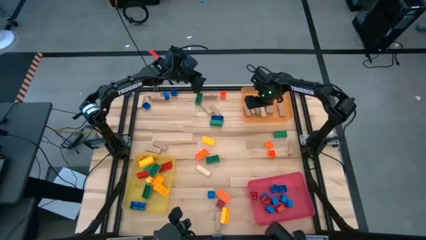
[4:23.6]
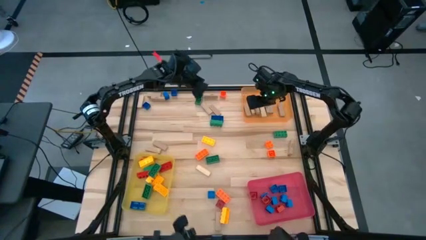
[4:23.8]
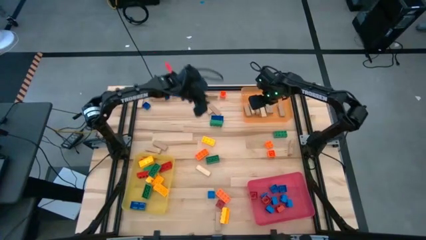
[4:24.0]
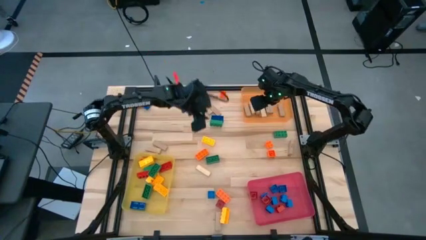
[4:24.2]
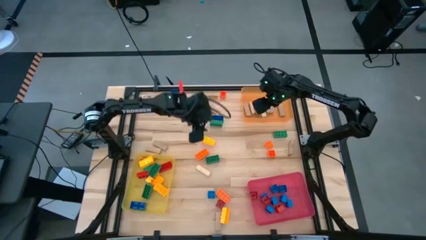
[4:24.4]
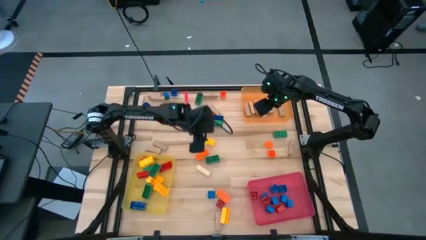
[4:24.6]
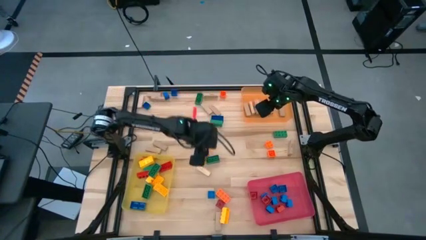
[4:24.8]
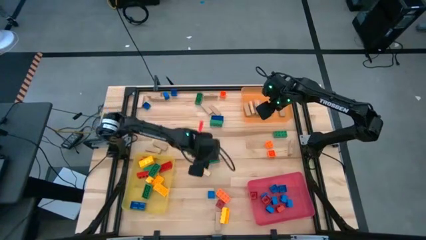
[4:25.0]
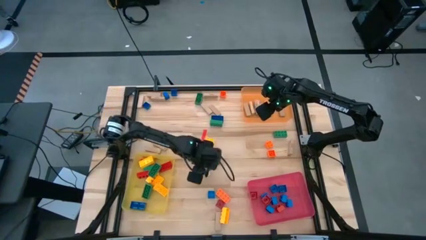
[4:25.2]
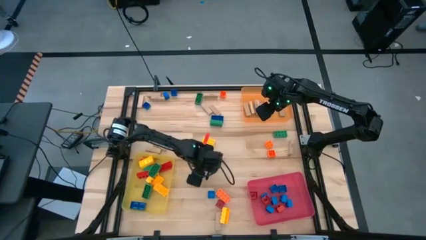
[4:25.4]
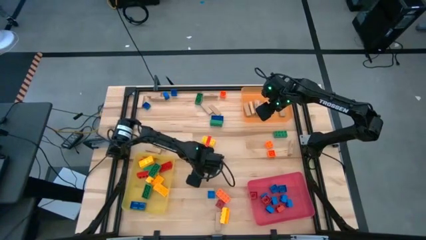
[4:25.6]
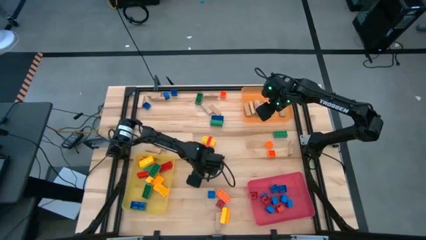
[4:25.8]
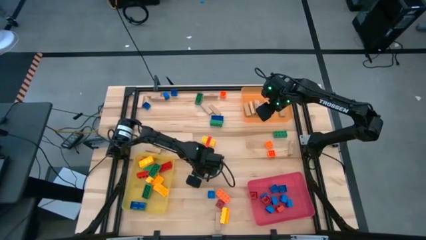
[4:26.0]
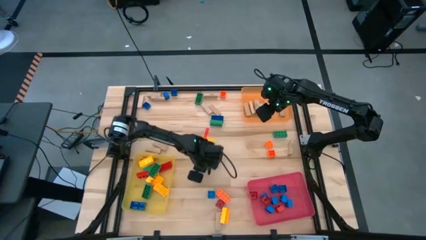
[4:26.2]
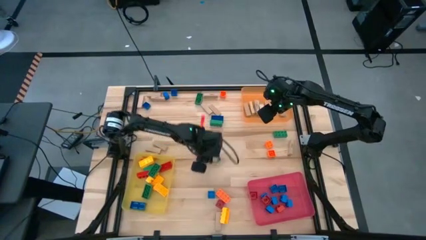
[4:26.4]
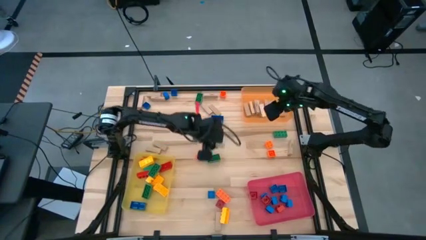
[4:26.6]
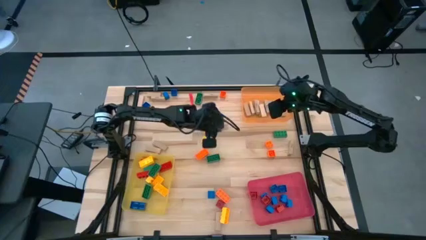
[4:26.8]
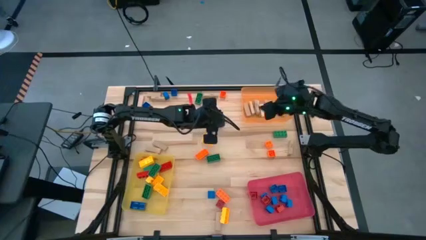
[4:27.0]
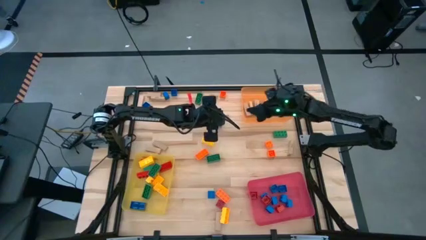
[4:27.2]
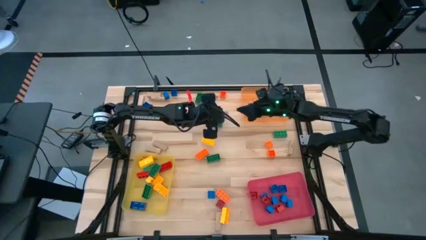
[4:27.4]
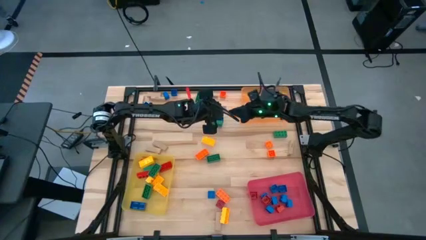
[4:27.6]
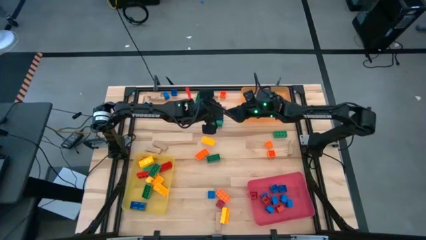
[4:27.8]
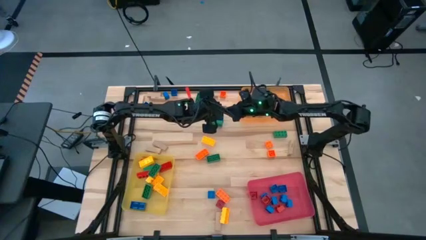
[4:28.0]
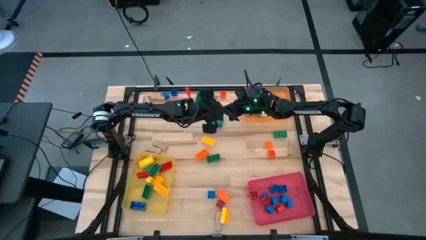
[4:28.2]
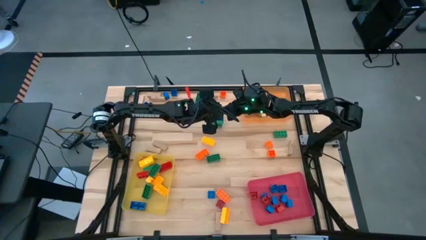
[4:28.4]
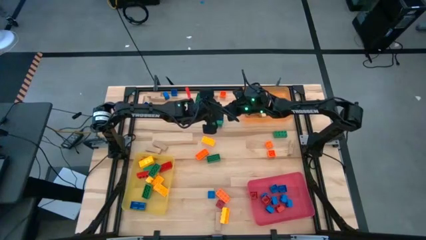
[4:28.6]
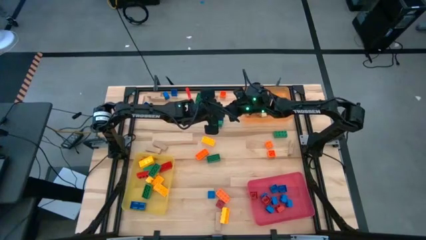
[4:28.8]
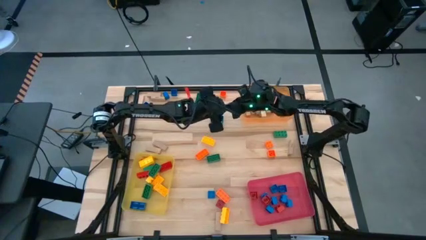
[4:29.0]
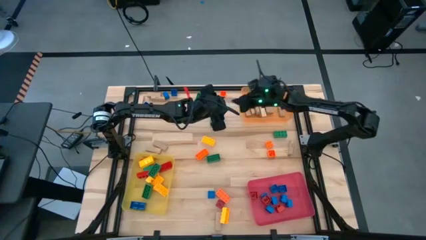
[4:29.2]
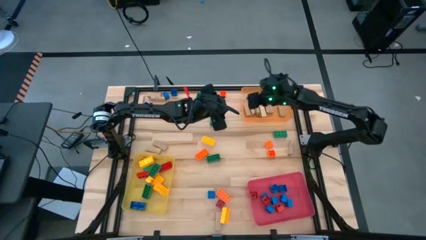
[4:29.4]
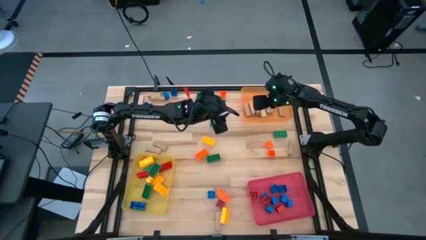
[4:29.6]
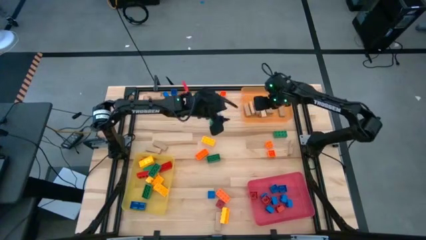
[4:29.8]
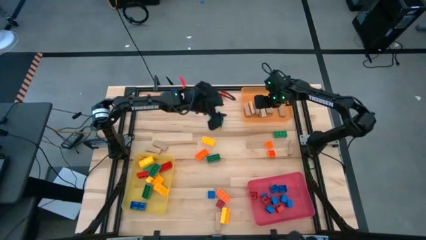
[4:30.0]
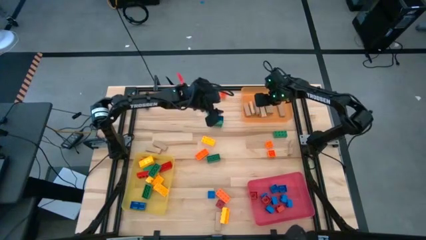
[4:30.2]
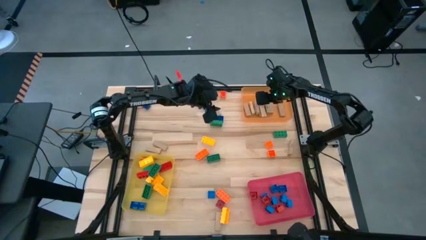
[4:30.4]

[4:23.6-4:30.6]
Task: Sort blocks by size
Put the brown block into the orange bin

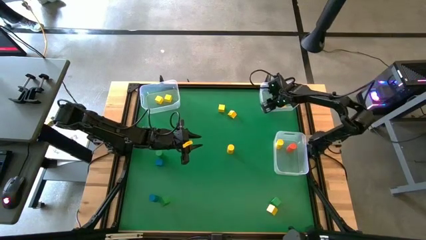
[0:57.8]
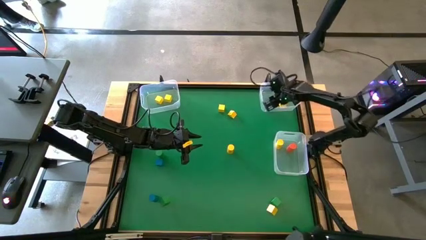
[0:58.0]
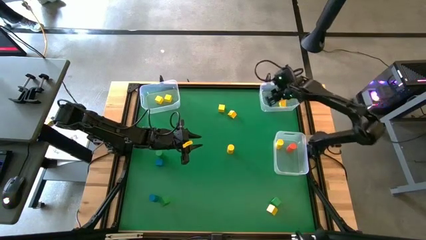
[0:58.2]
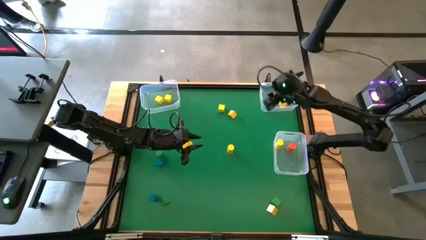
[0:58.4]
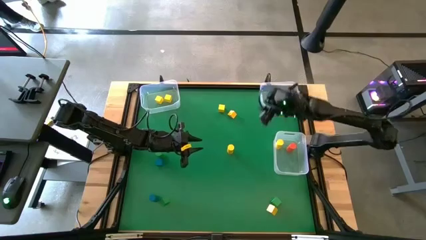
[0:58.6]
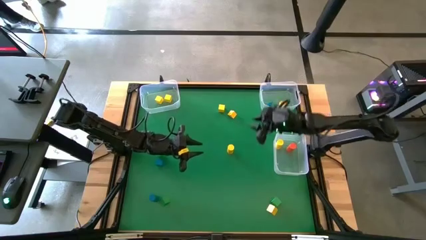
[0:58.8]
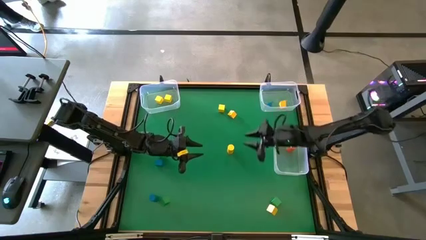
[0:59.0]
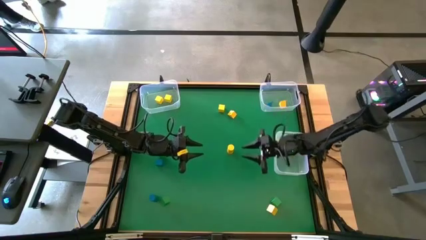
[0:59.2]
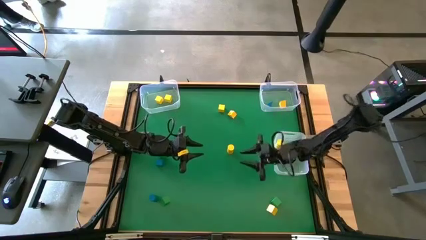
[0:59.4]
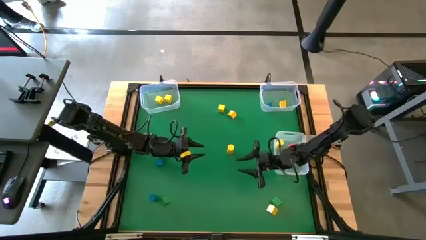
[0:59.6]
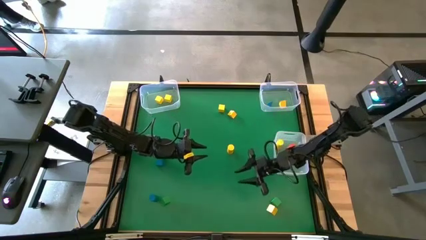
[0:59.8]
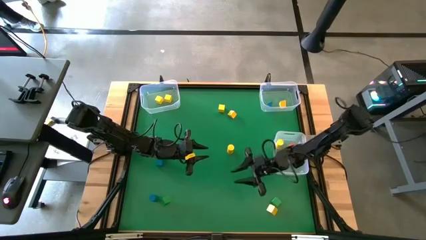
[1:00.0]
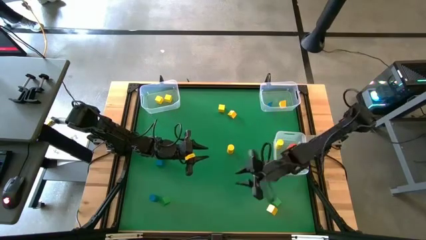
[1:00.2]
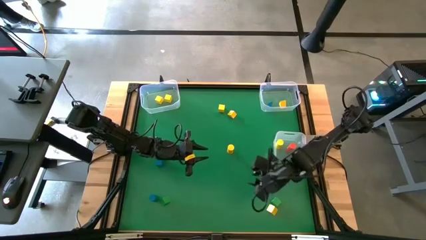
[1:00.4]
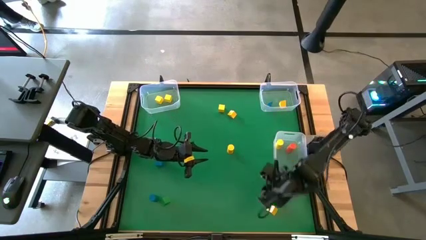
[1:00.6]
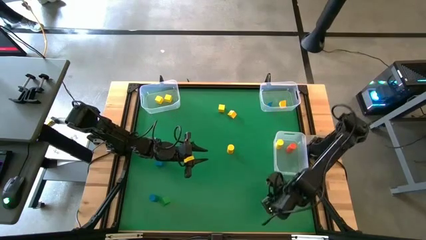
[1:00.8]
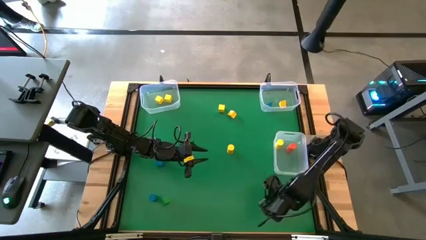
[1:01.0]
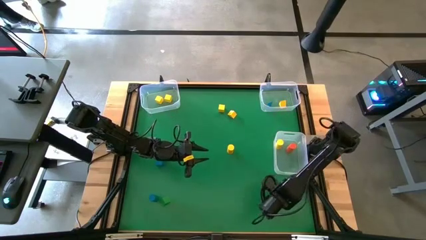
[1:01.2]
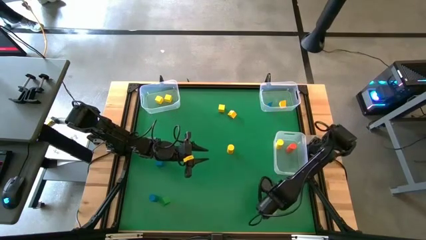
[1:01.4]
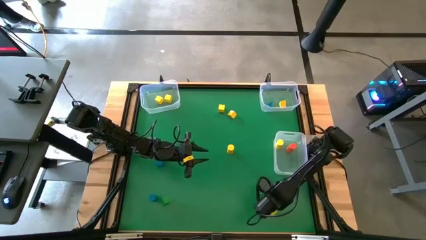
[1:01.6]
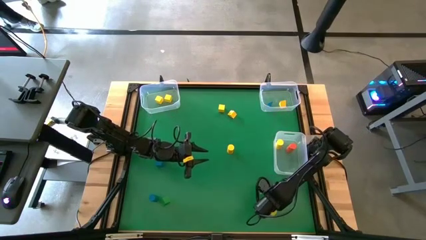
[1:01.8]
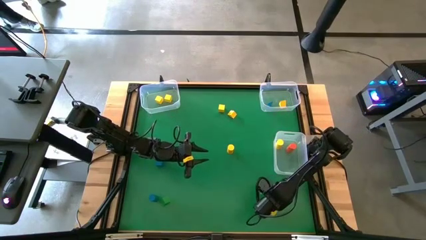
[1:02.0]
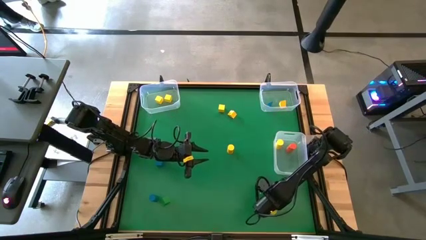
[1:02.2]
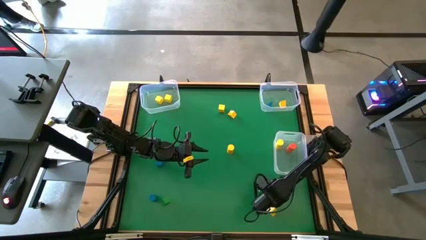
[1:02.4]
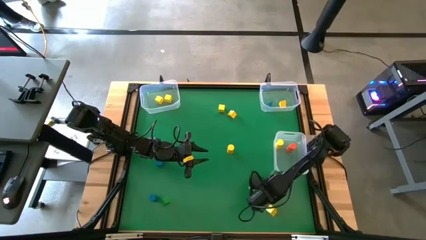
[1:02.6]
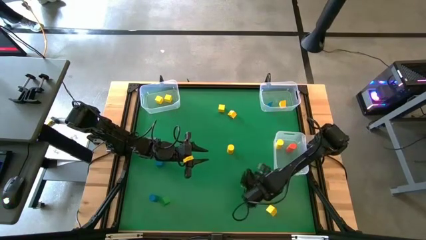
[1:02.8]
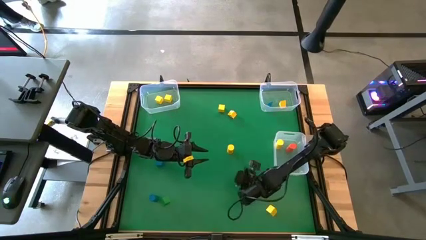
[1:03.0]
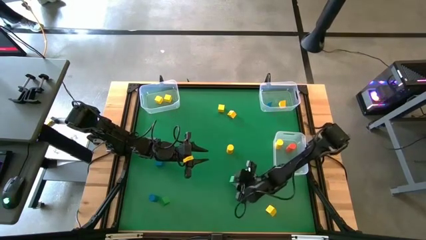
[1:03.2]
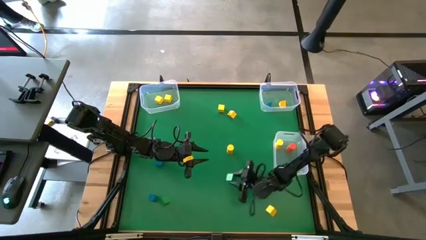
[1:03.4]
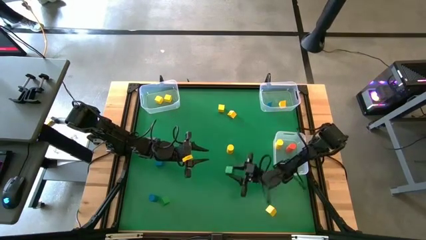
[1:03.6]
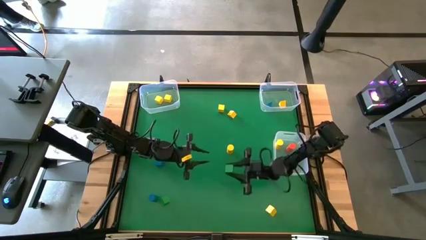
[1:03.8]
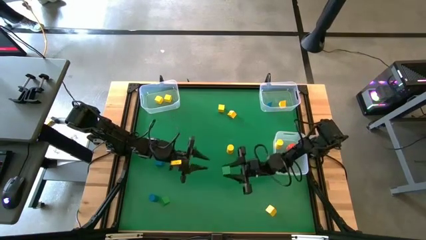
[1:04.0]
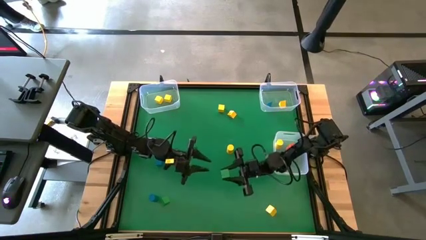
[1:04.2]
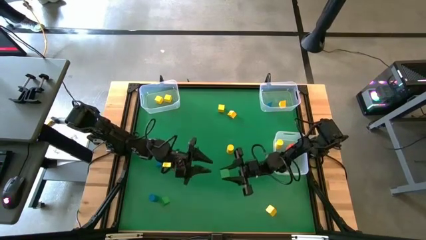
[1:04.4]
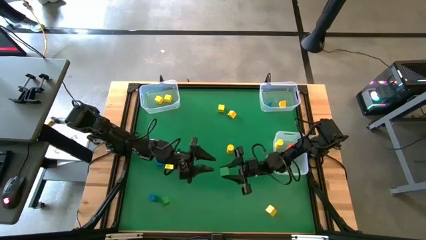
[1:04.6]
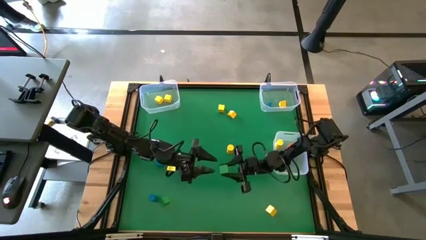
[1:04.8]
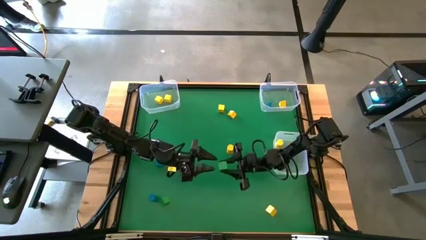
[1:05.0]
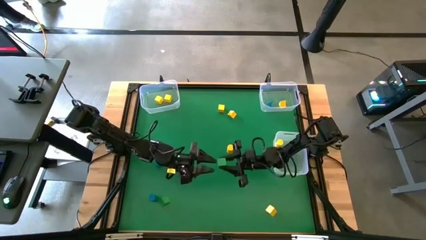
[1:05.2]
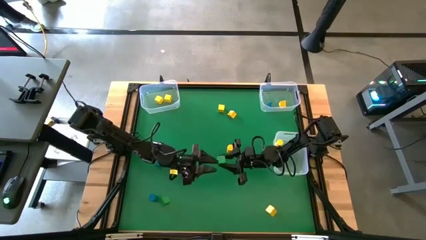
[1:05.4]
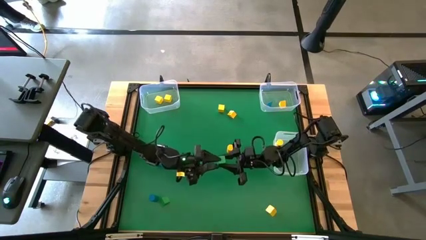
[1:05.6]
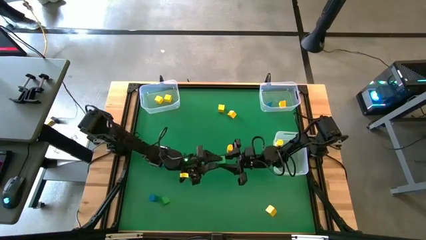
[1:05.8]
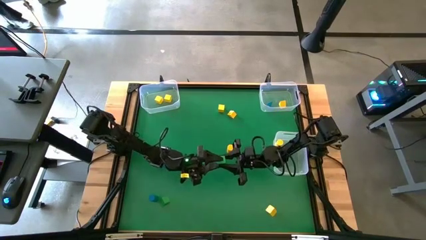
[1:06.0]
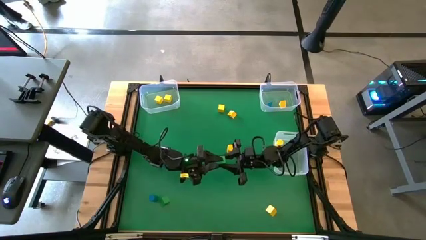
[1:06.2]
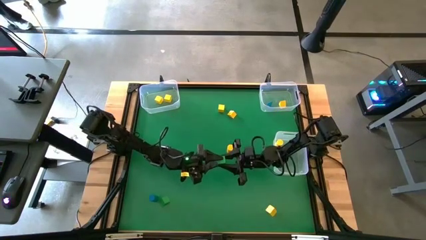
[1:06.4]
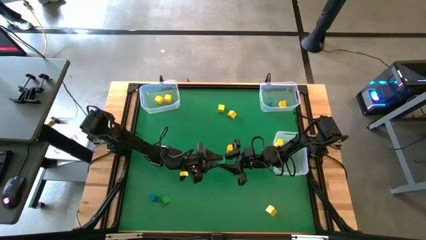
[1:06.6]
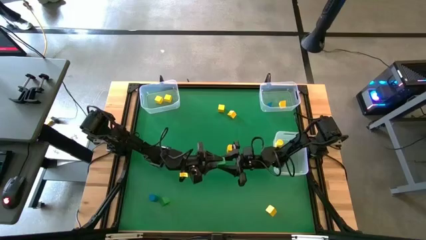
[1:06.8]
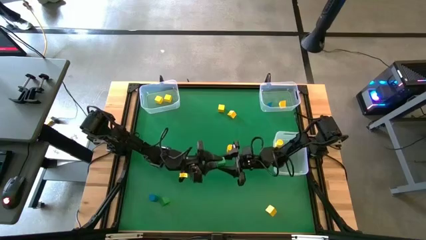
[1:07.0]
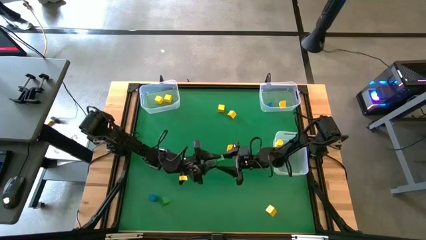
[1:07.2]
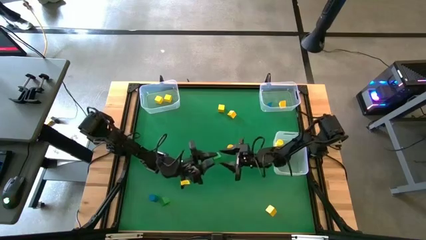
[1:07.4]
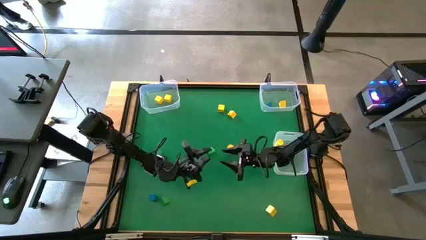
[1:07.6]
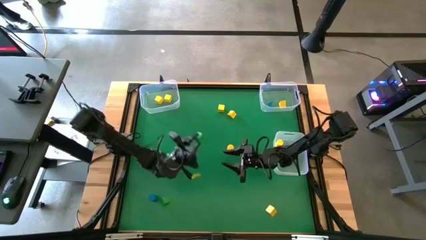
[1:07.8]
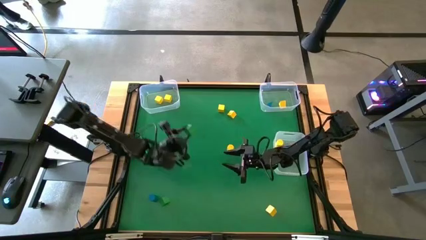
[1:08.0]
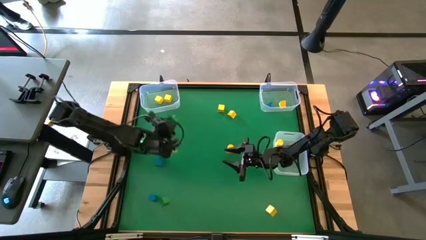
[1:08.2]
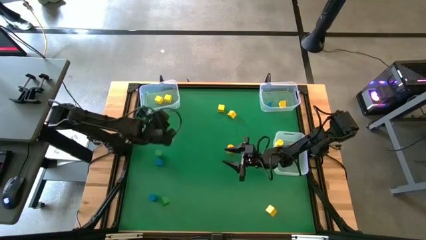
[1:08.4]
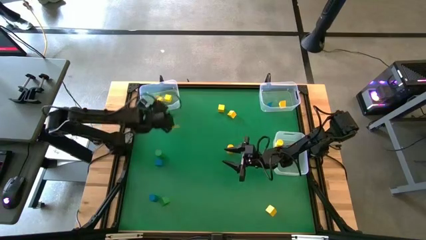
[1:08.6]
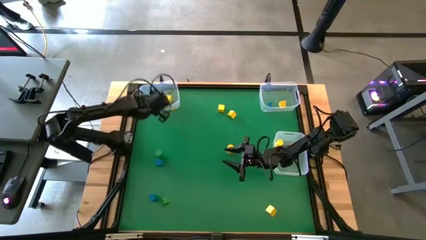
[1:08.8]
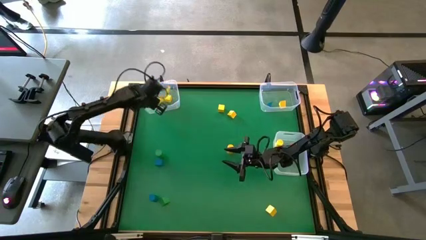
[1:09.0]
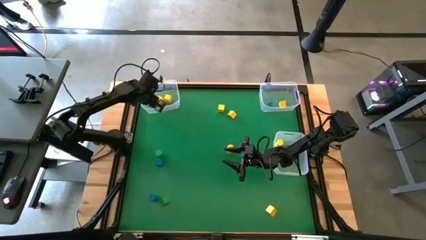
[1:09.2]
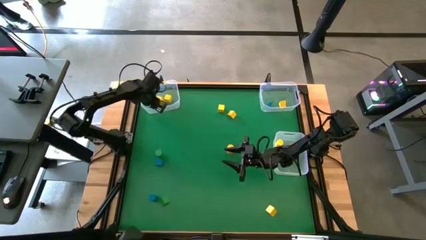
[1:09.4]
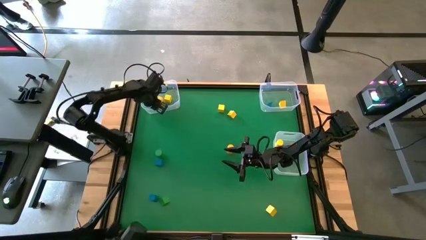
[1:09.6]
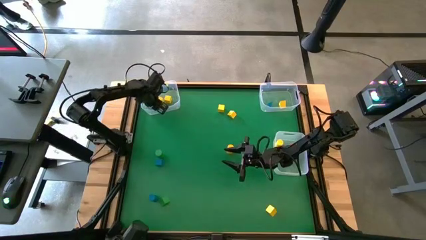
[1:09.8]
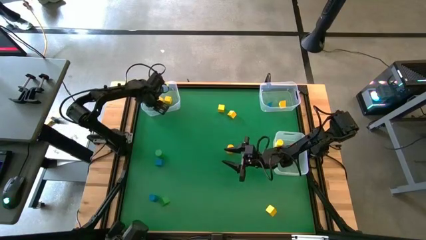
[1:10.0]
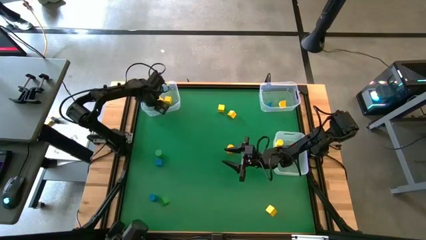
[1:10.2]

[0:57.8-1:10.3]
Task: Sort blocks by size
Put the green cube block into the top left transparent bin
